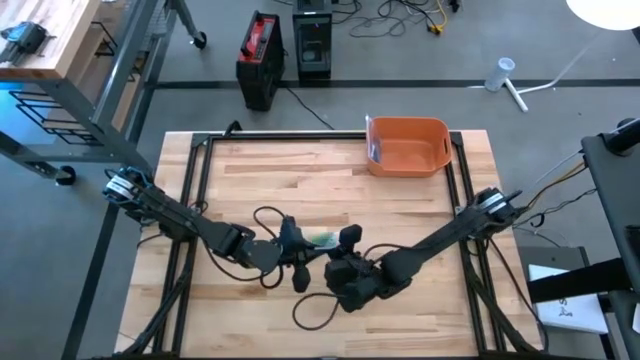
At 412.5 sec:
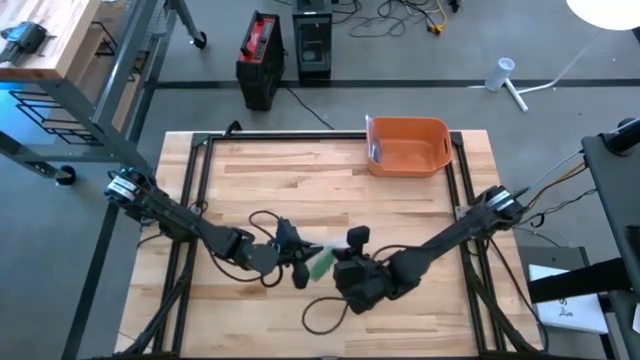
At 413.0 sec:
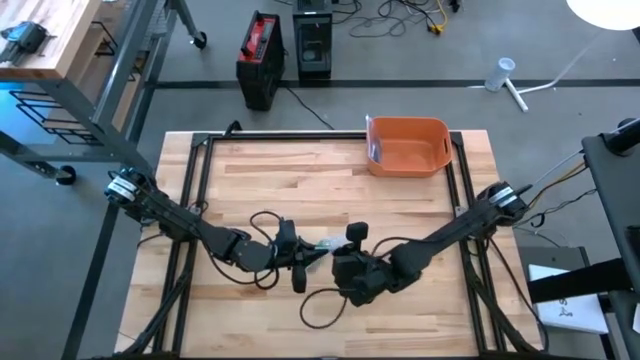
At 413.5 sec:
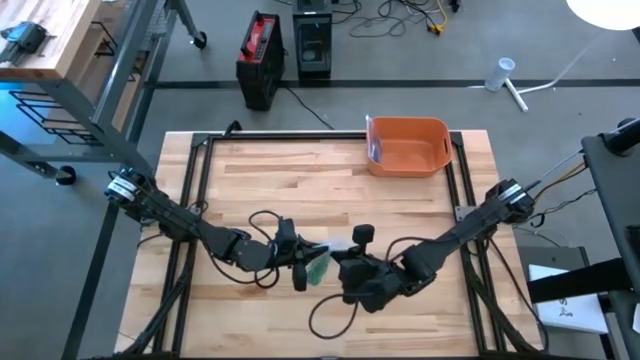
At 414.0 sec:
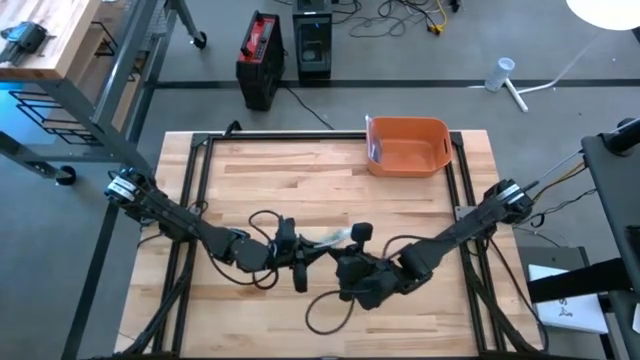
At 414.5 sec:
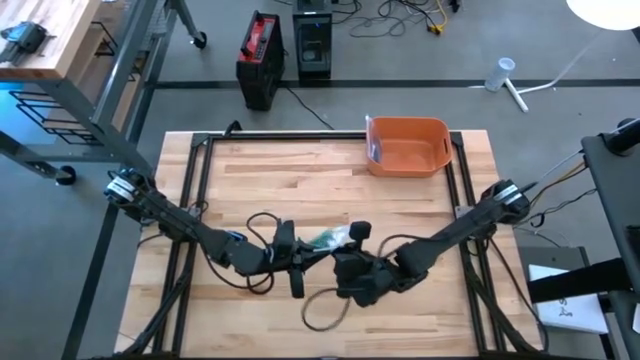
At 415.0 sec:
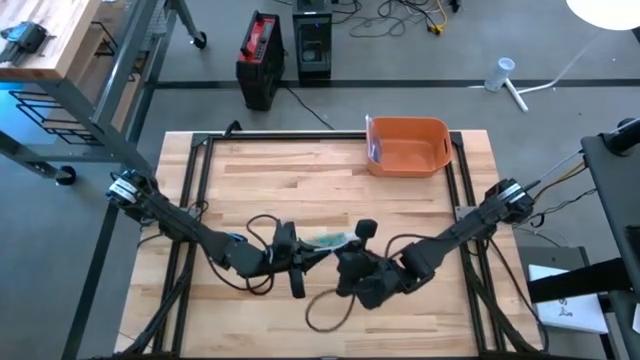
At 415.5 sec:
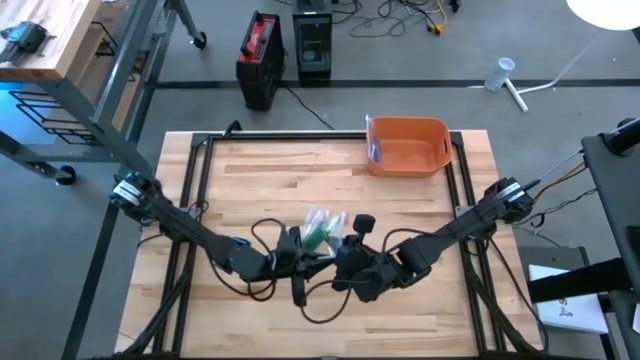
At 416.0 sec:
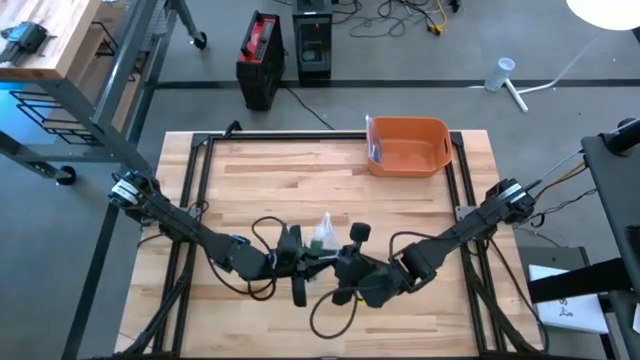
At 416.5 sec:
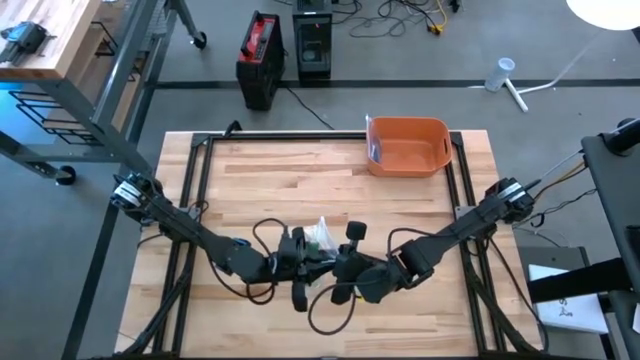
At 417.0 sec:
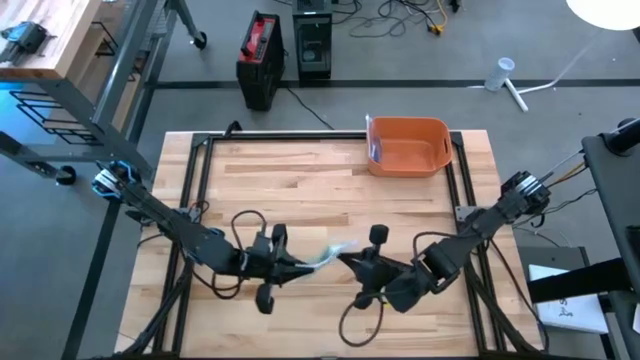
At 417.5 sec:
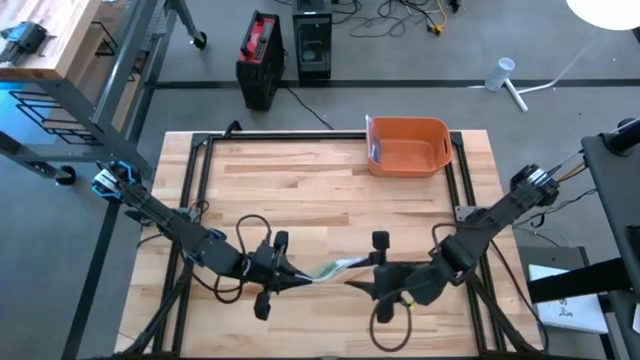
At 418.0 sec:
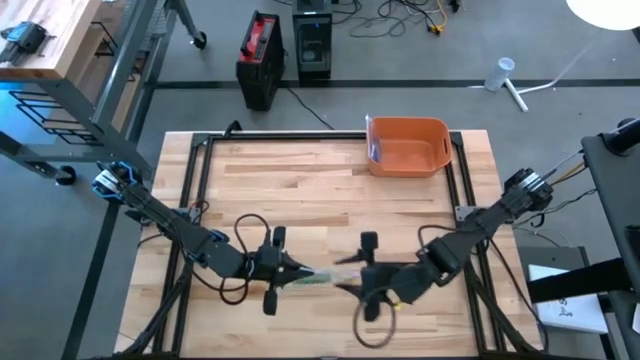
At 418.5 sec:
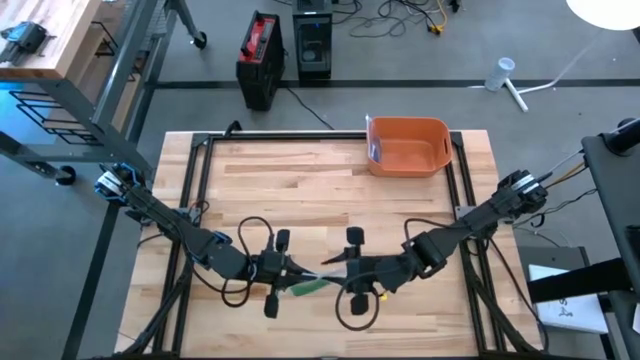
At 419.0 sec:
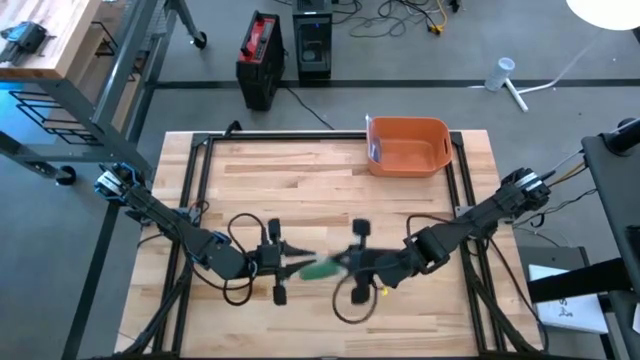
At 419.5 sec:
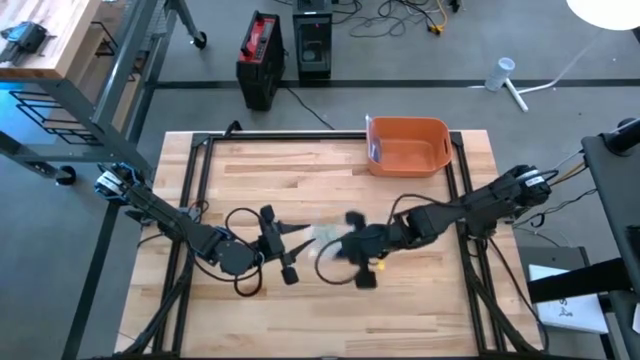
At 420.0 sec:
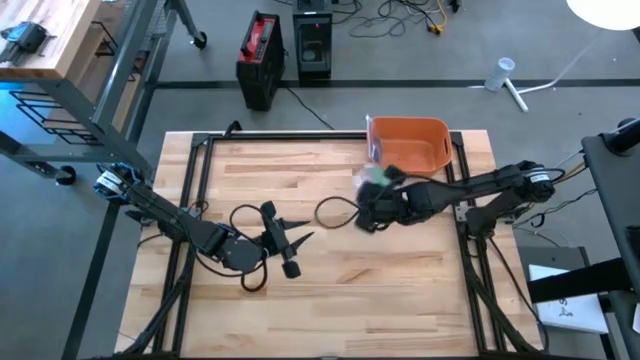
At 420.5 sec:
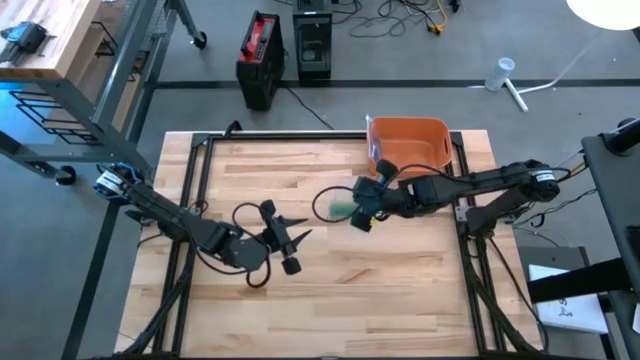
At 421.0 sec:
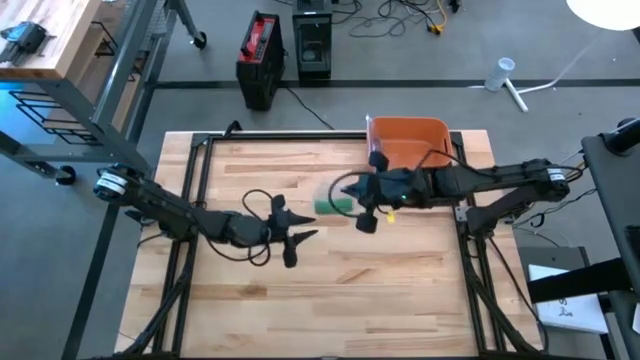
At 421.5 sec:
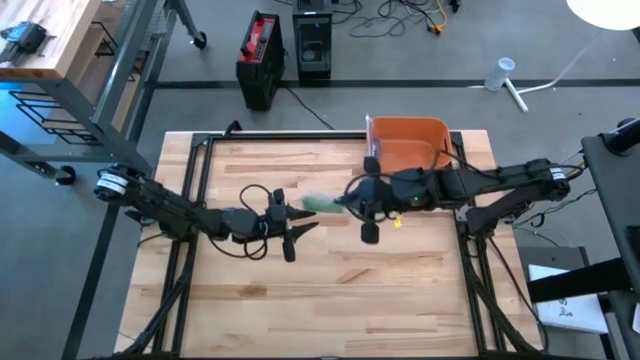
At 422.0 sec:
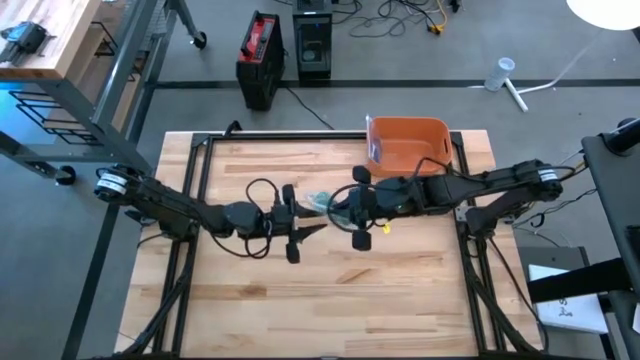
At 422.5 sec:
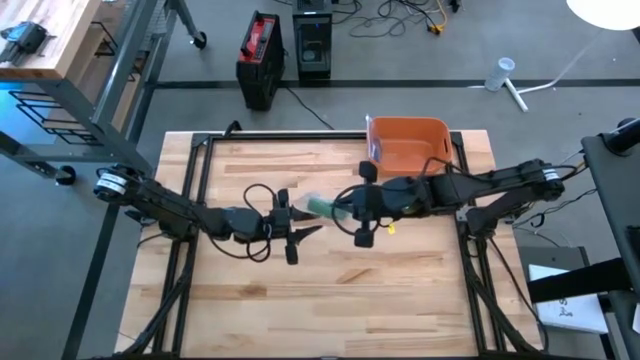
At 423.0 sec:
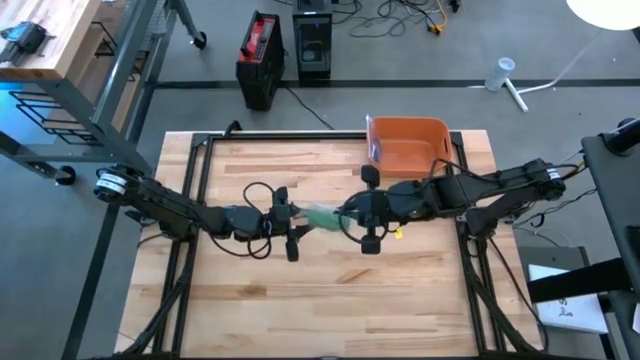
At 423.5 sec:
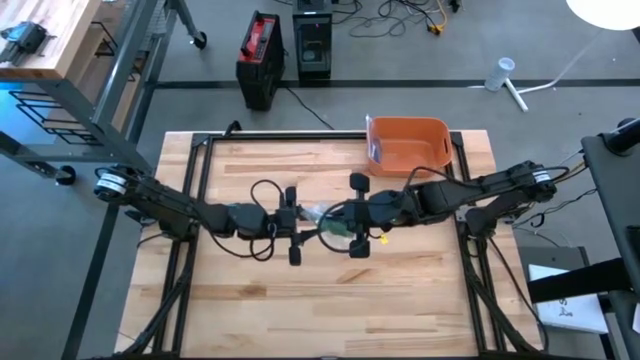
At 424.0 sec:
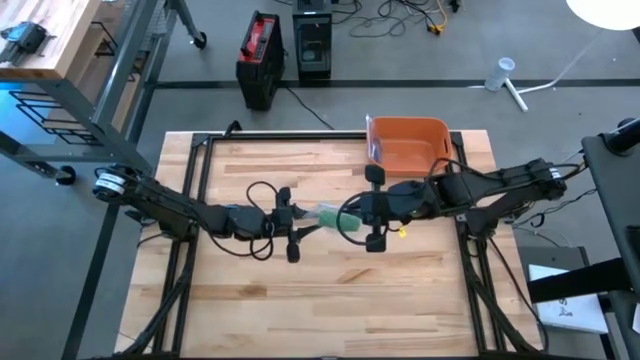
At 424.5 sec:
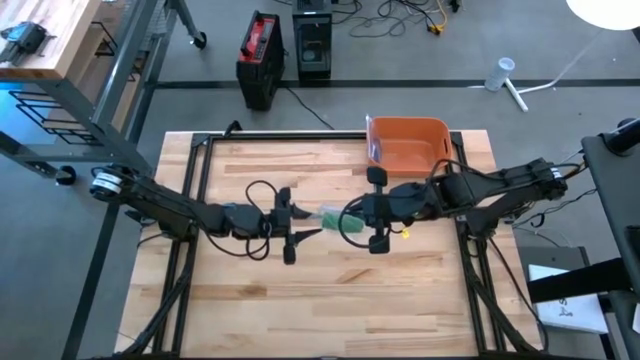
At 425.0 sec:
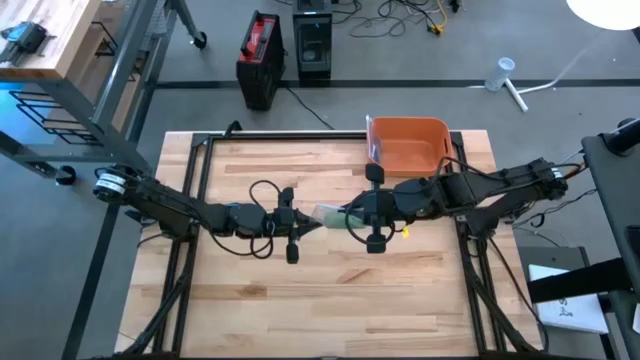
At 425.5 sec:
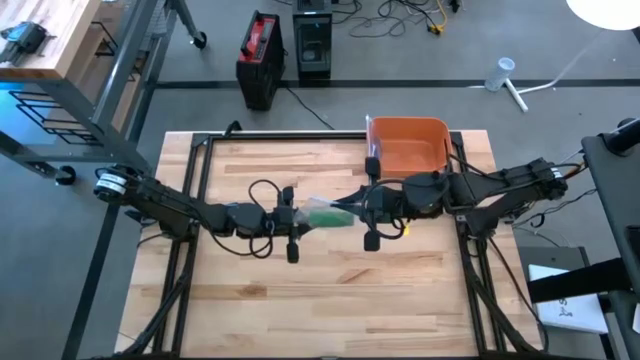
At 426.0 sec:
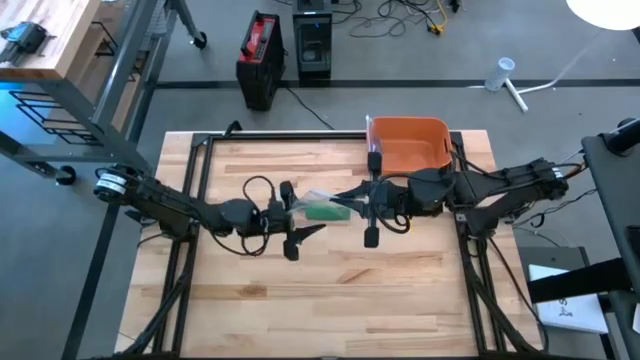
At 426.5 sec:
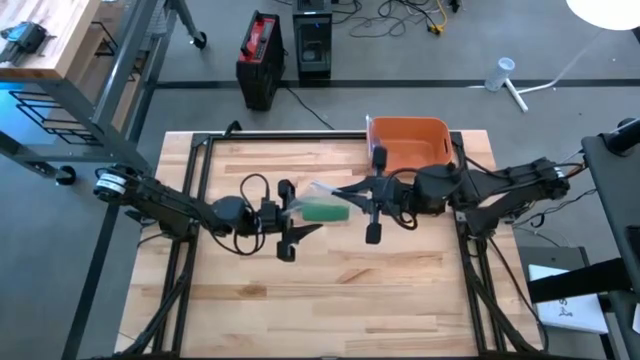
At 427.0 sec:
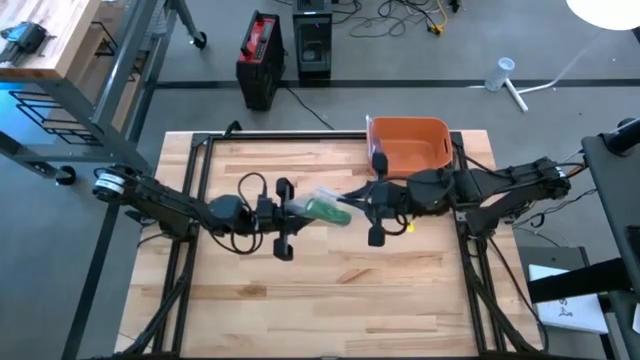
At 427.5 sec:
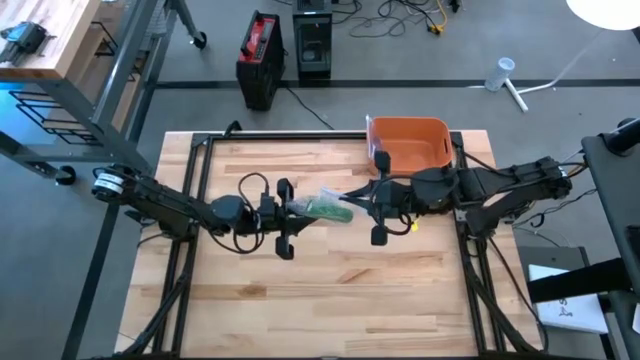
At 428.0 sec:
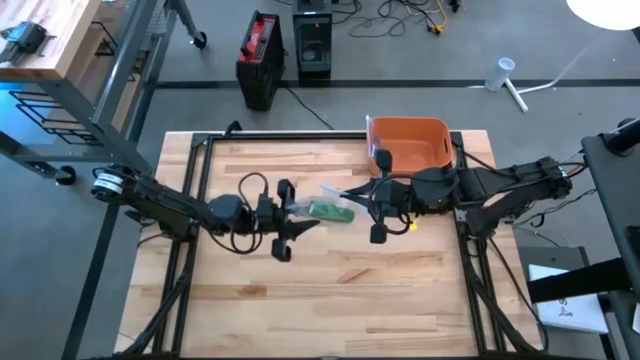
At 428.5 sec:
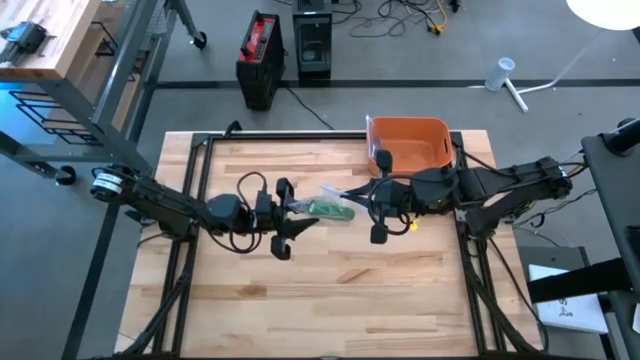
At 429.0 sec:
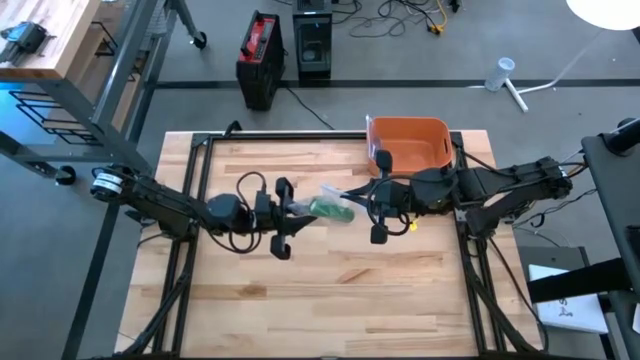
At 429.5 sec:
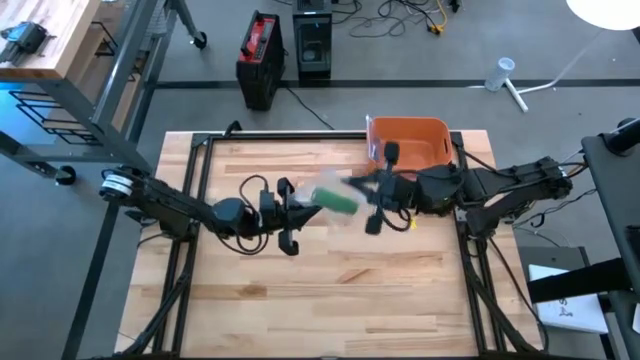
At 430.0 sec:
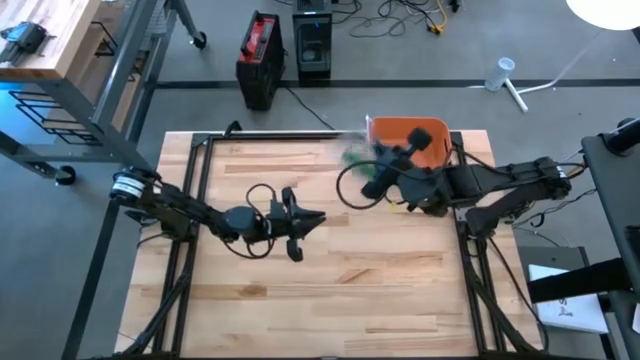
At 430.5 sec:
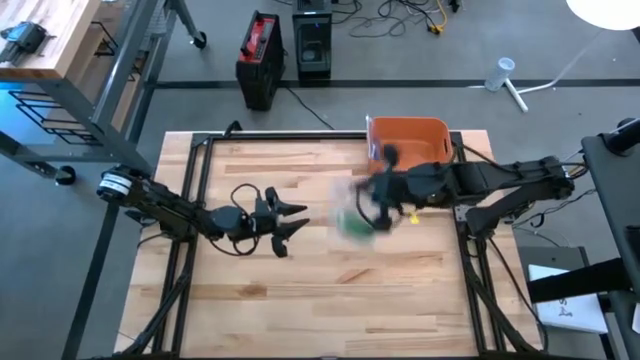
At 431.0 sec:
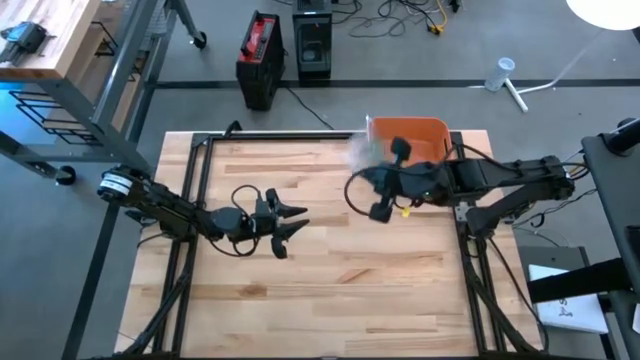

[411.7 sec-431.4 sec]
Task: Roll bandage
Put the rolled green bandage inside the transparent zip bag

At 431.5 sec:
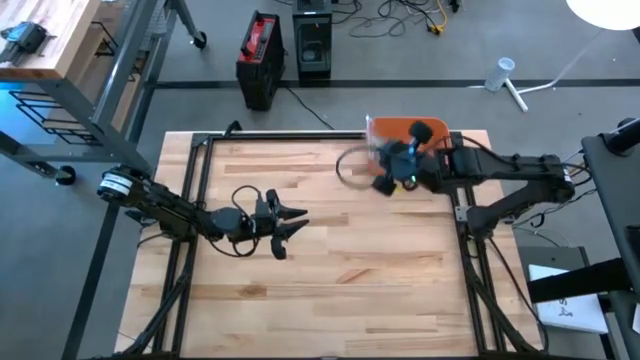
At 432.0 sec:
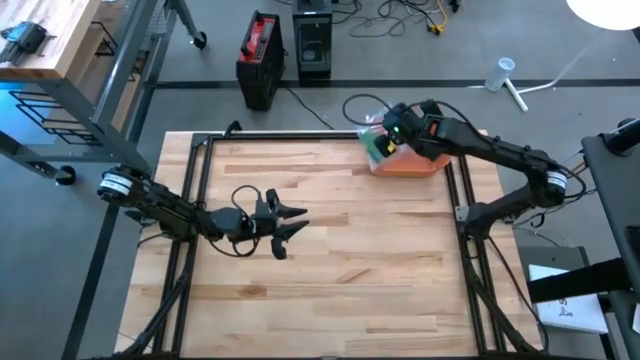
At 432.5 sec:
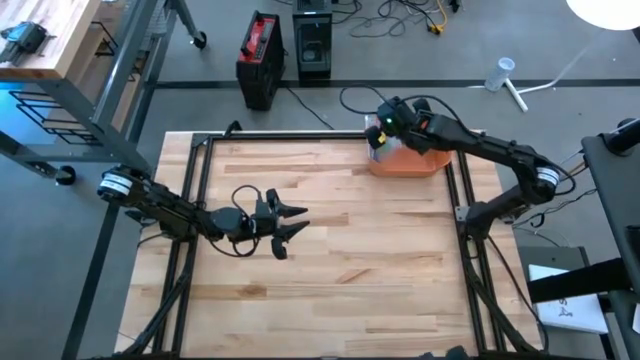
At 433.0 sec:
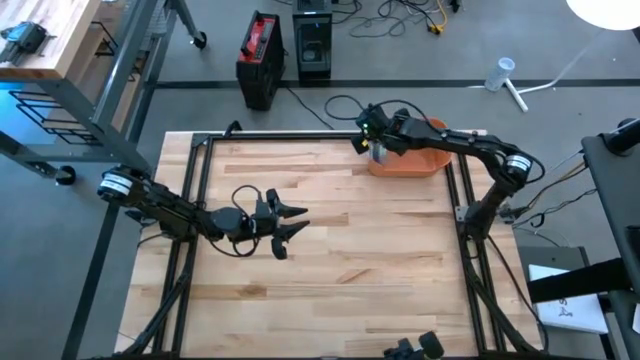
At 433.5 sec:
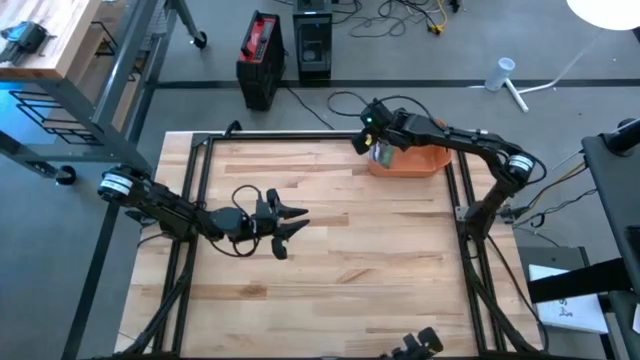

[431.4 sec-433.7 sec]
Put the transparent zip bag containing the green rolled bandage into the orange bin
